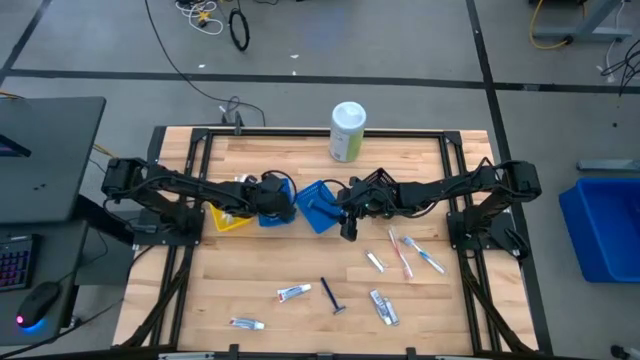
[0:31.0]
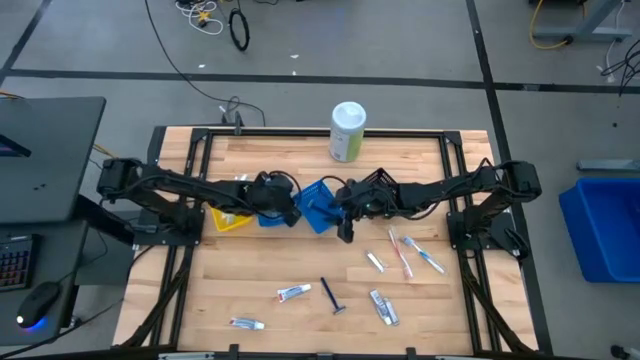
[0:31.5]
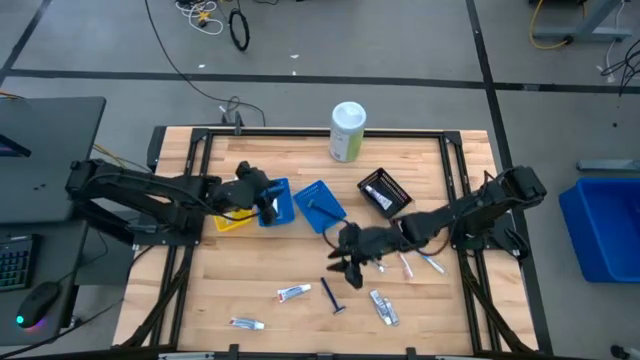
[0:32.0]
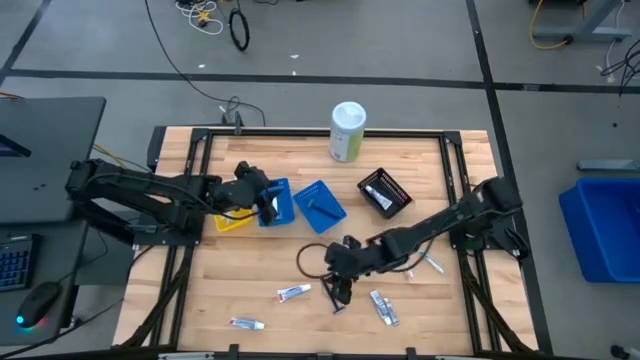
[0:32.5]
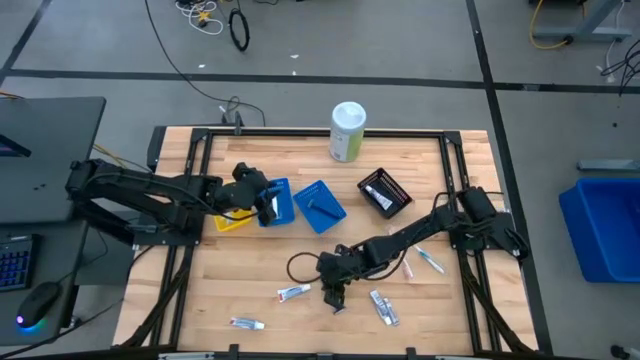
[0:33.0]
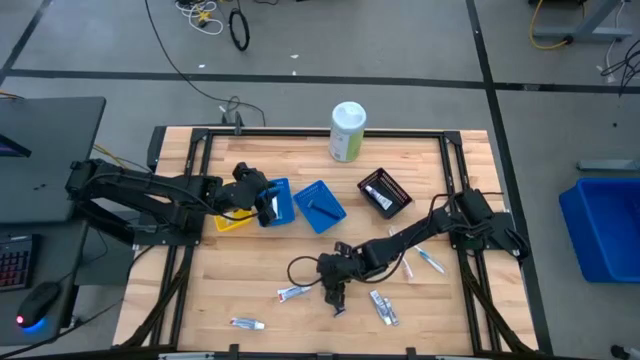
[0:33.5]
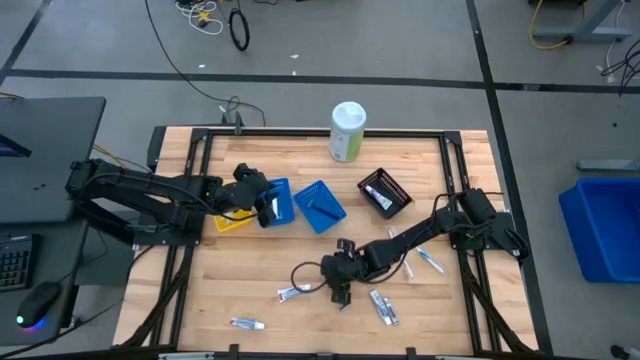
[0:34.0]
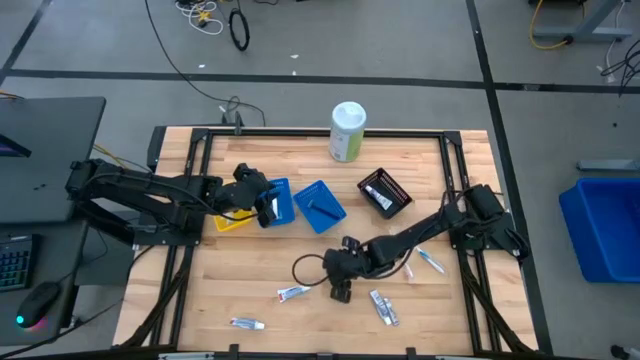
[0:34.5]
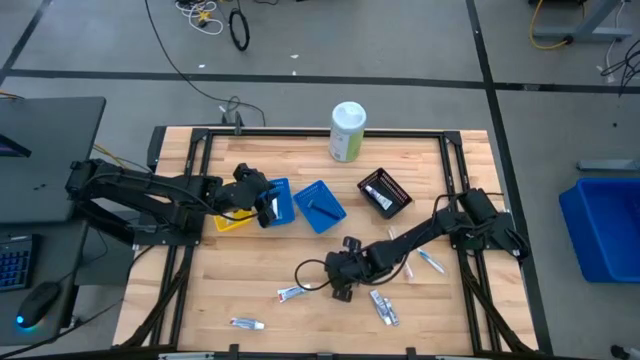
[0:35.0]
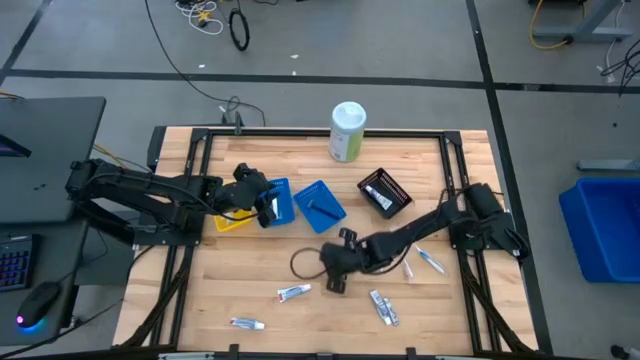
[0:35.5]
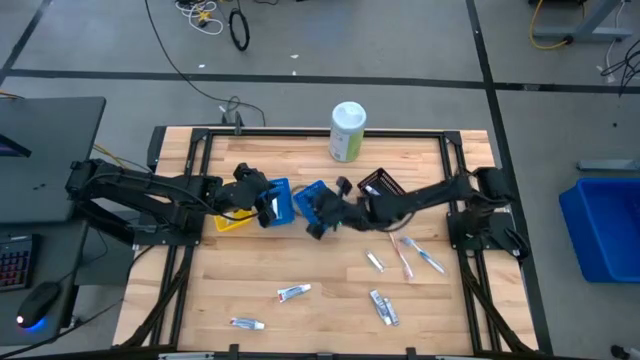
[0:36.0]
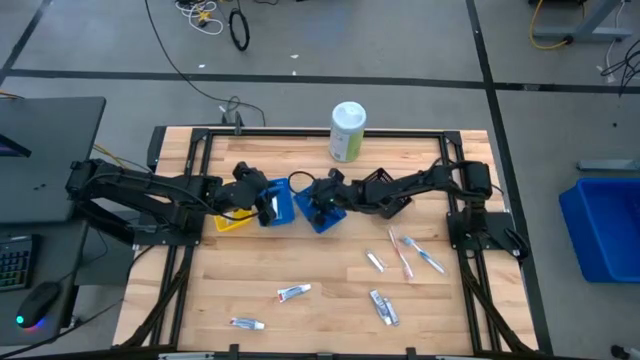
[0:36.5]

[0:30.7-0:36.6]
Task: Pick & Place Travel size toiletries
Put the blue razor into the right blue bin

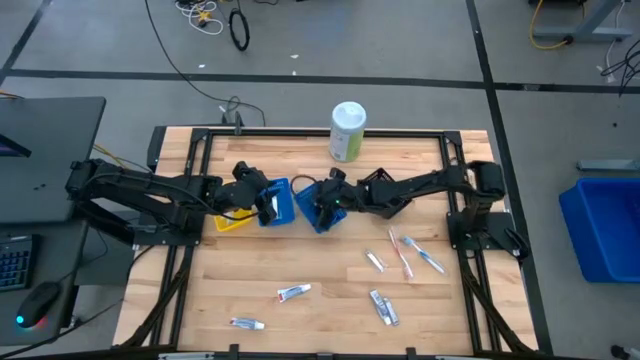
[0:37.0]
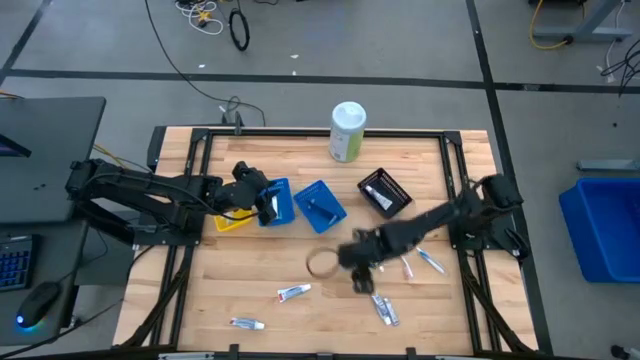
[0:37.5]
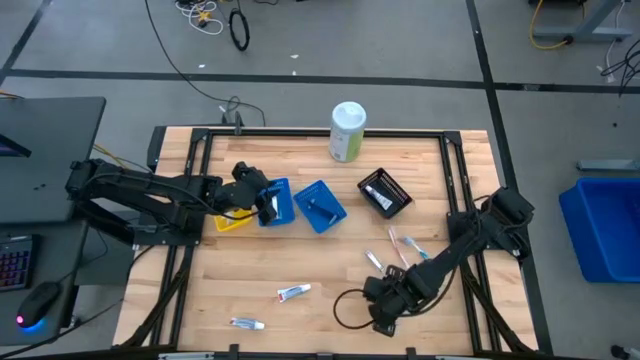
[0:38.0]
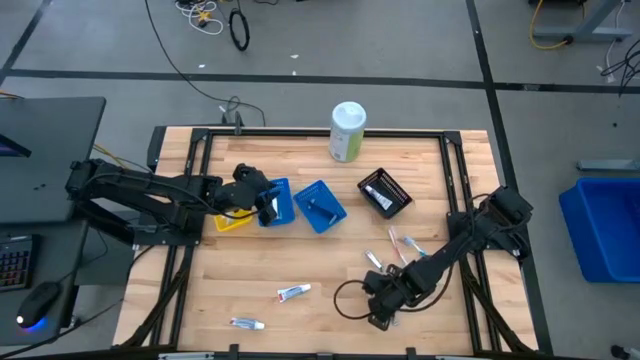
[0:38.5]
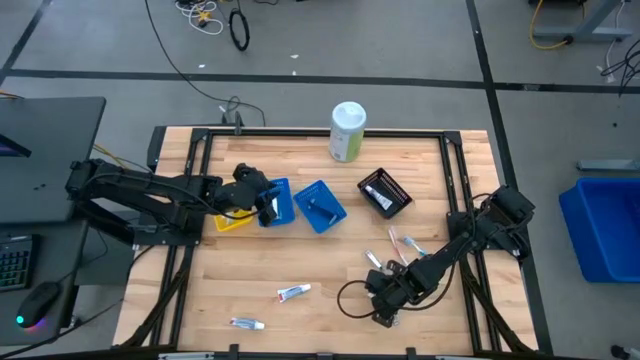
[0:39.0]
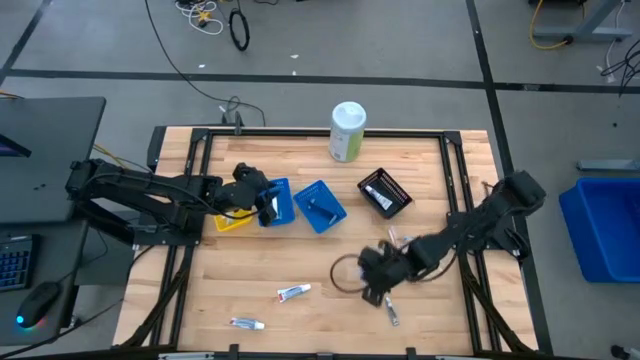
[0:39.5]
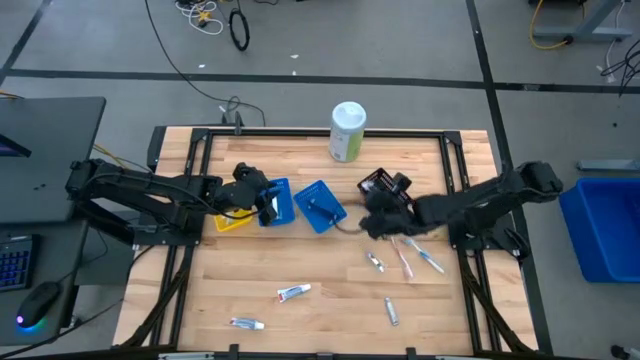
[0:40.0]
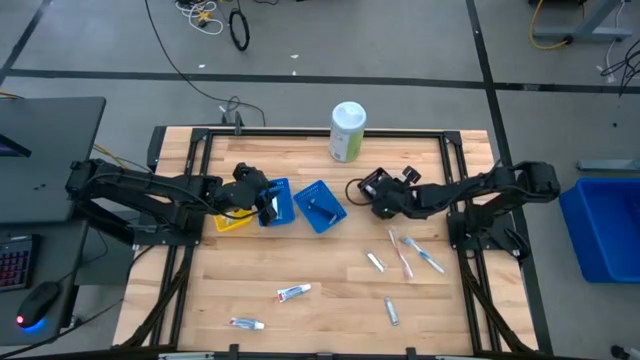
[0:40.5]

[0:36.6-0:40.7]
Put the white toothpaste into the black bin

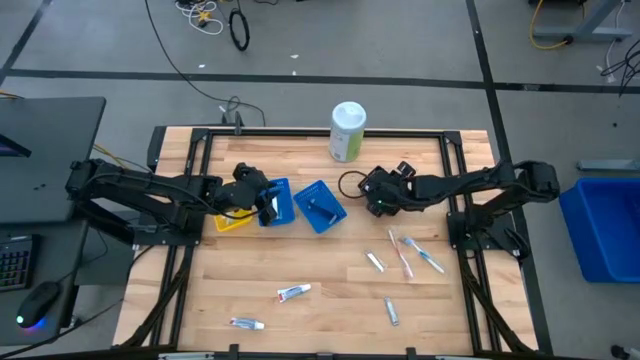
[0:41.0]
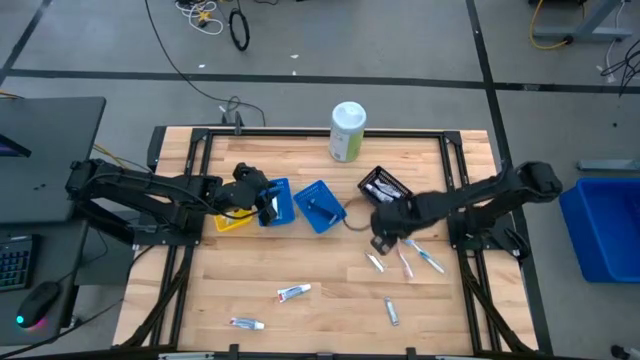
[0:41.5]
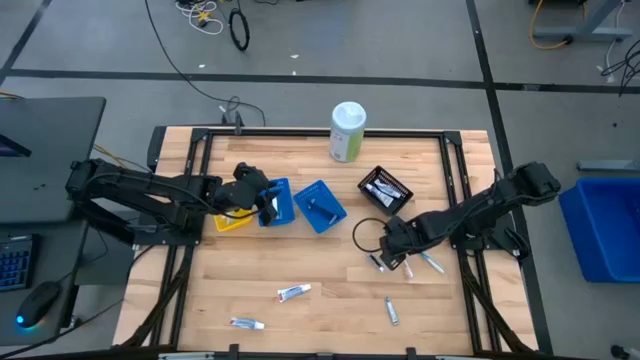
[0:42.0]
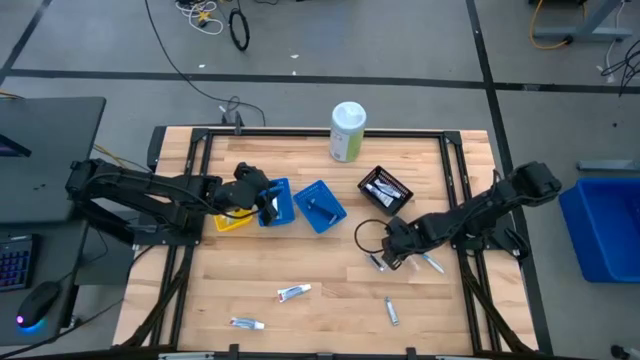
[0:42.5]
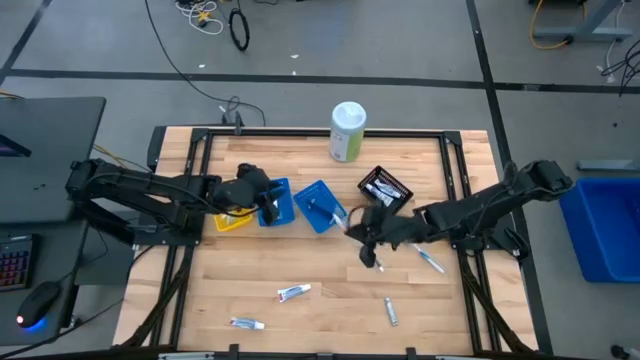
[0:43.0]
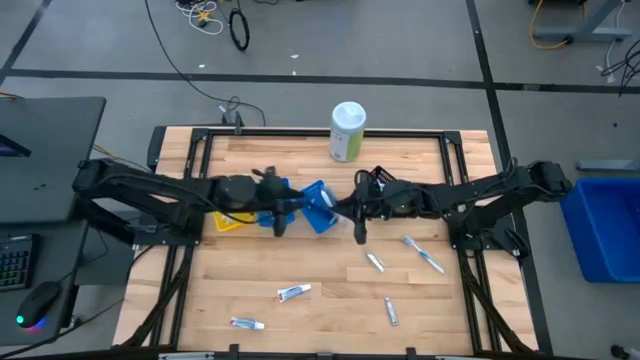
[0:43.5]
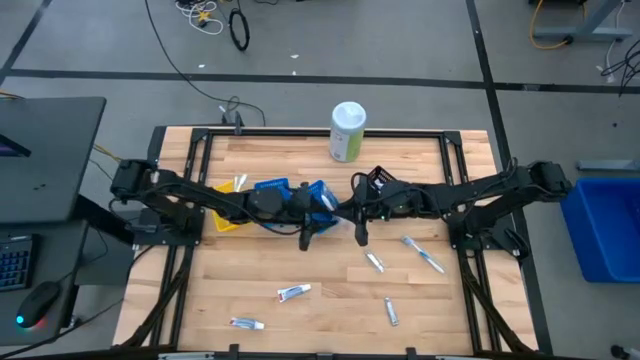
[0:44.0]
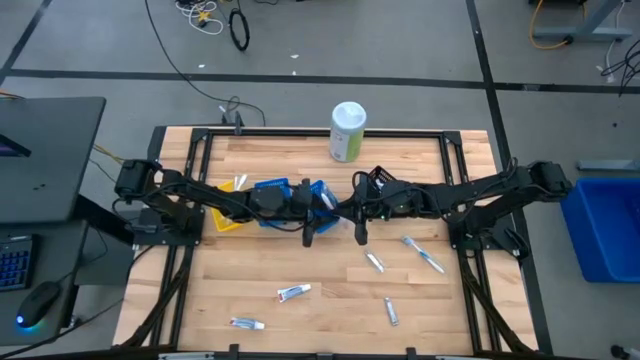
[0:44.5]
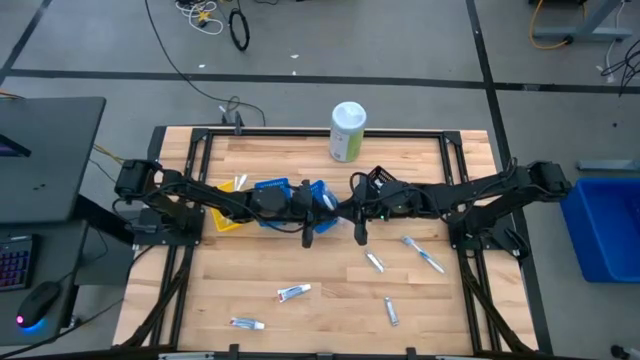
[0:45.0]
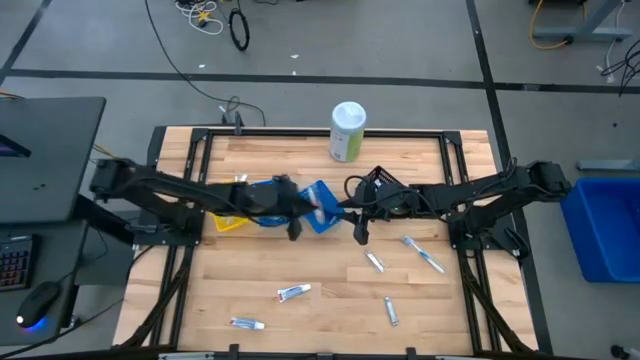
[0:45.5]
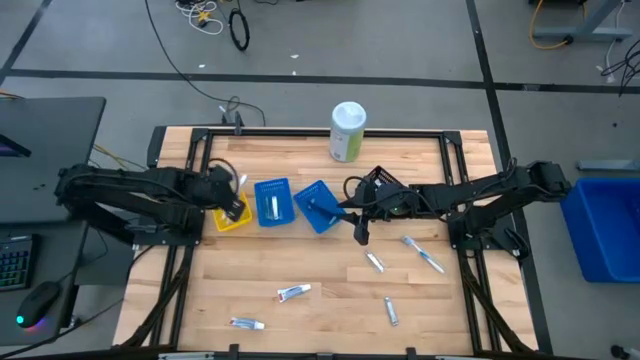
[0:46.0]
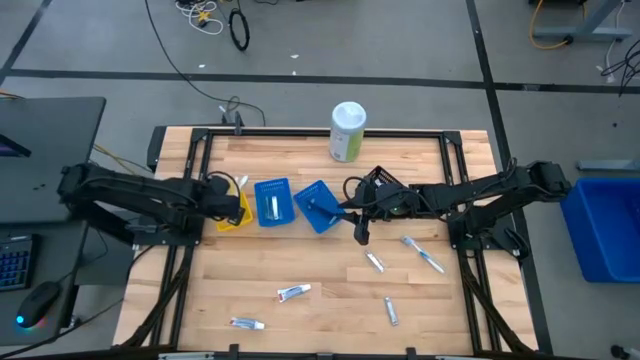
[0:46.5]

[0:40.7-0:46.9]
Put the red toothbrush into the yellow bin

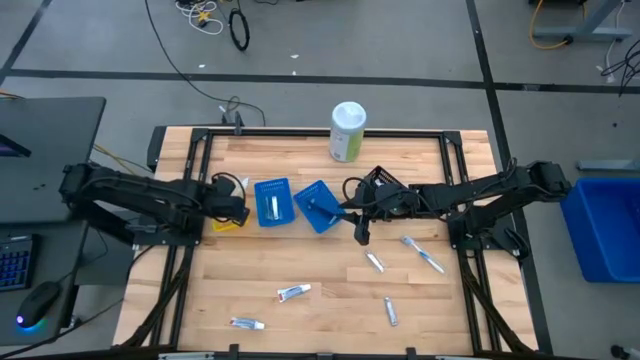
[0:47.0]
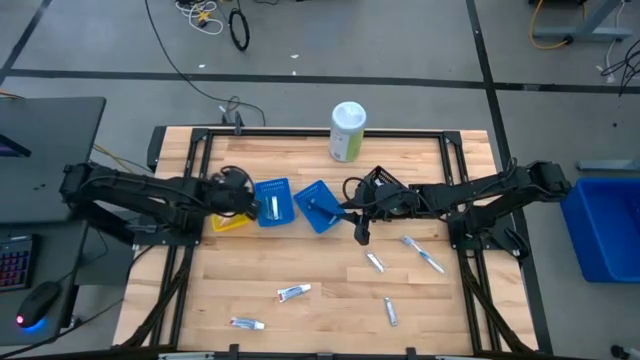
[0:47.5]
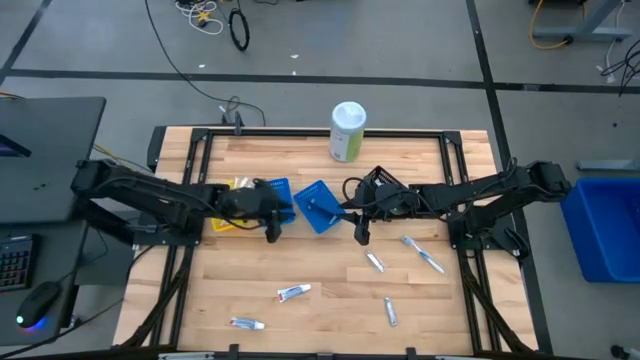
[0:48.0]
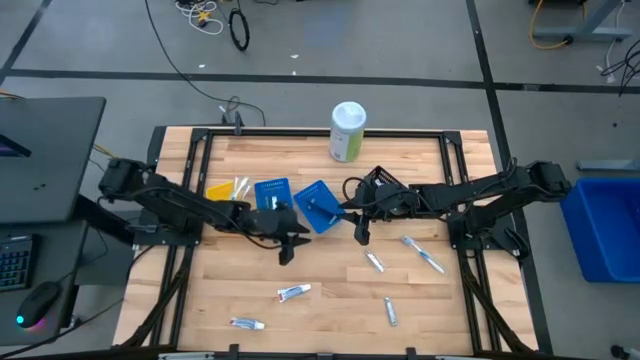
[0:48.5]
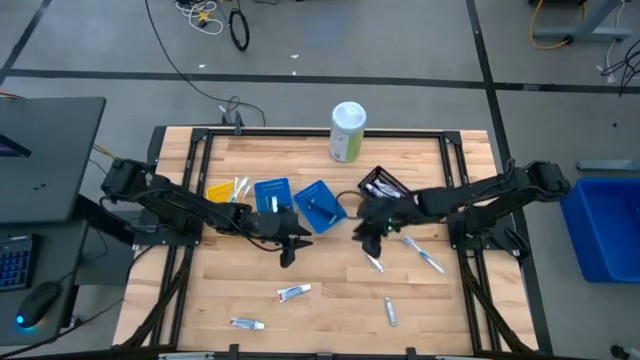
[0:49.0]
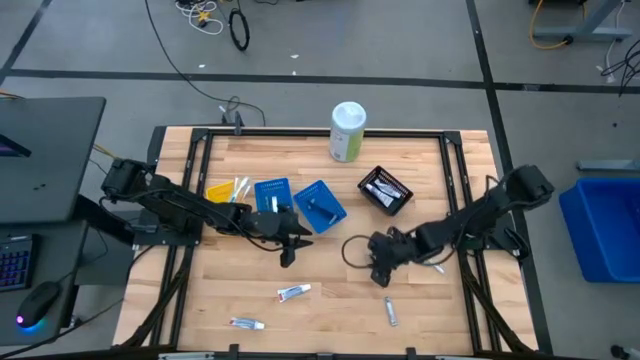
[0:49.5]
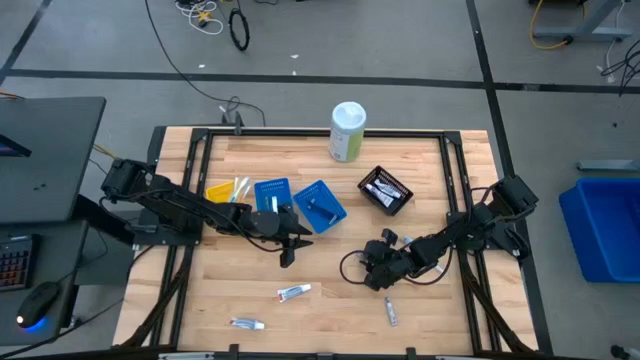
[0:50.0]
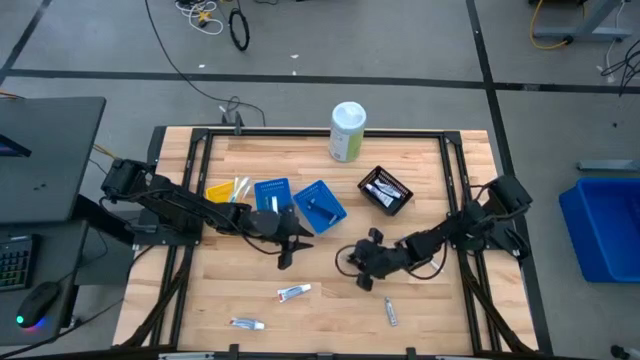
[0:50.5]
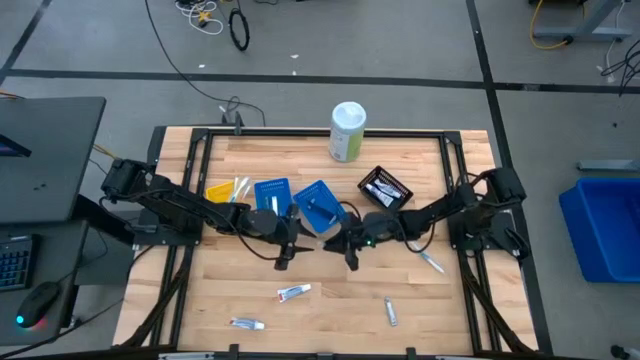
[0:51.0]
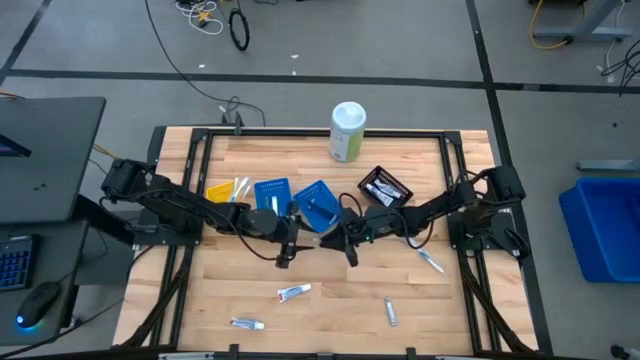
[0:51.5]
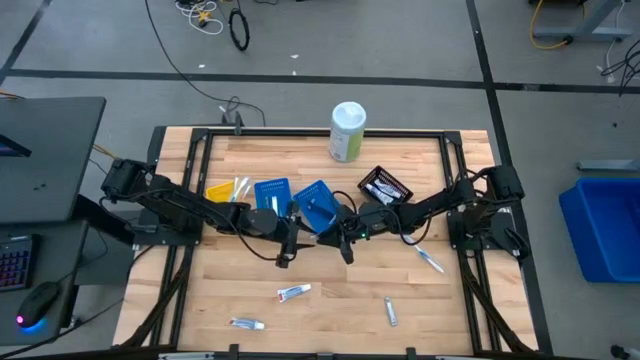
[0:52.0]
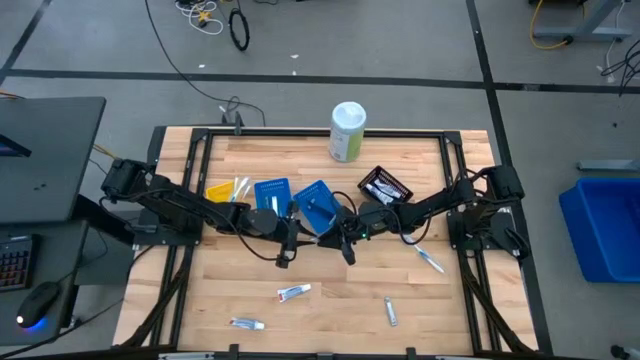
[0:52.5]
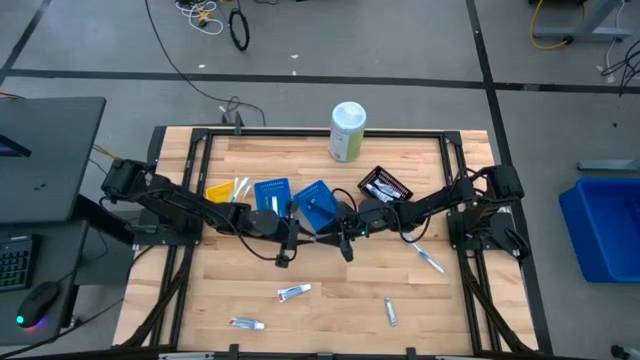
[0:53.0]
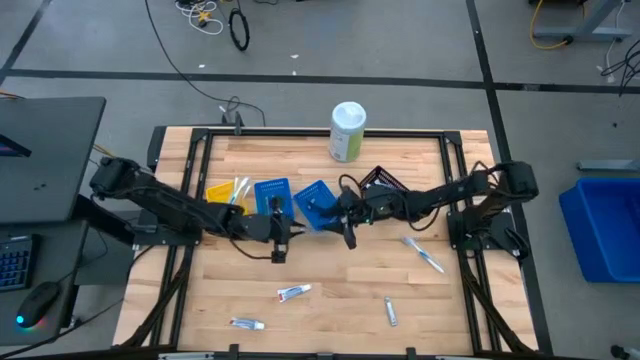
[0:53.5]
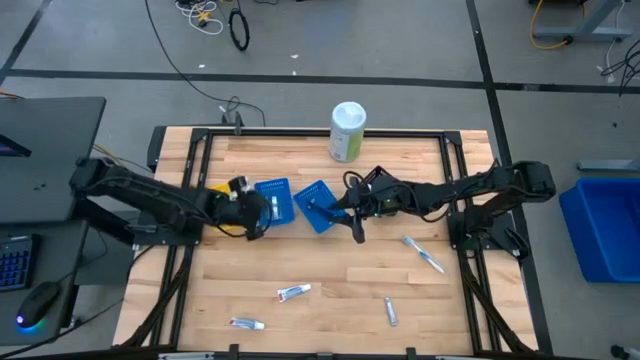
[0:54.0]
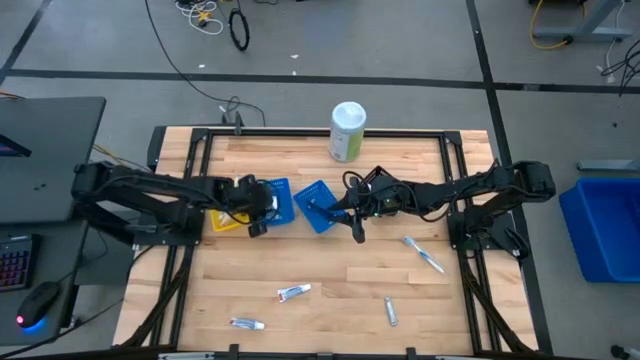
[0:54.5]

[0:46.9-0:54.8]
Put the silver nail cutter into the left blue bin
